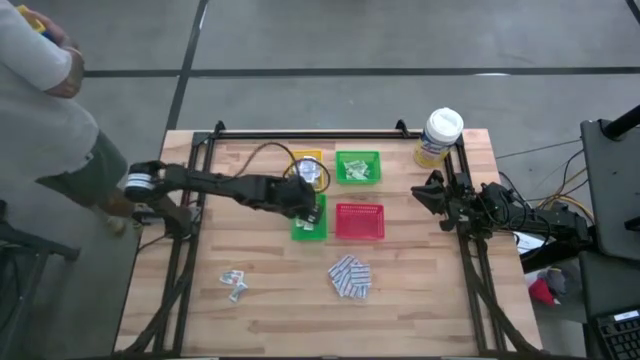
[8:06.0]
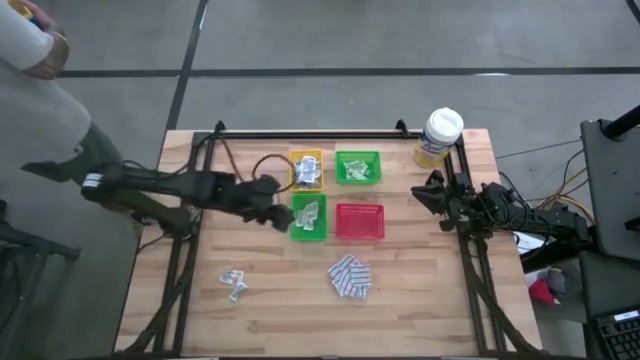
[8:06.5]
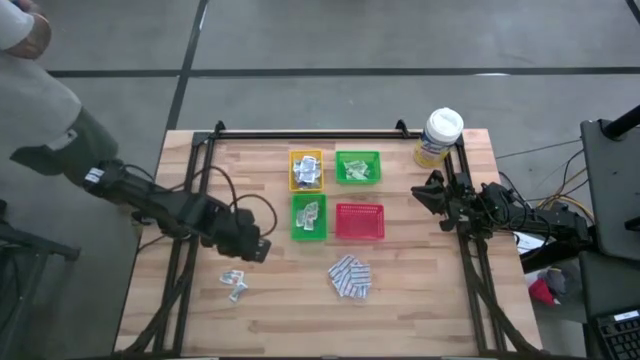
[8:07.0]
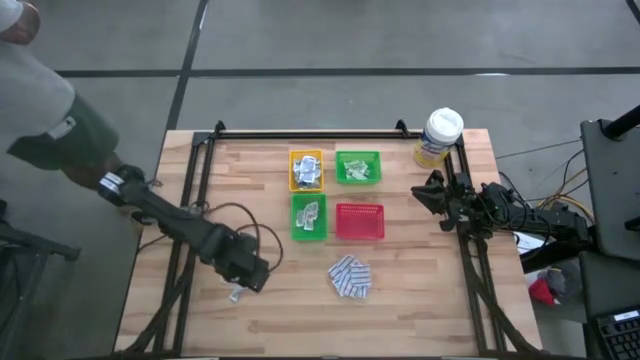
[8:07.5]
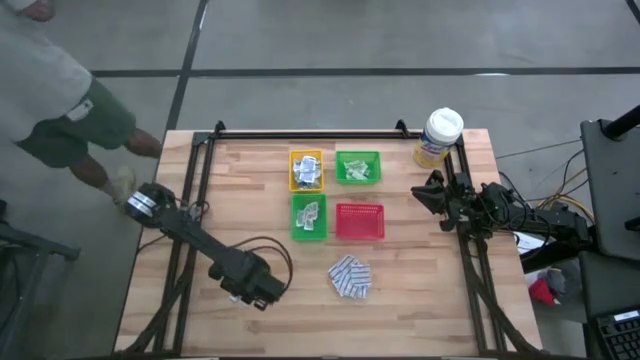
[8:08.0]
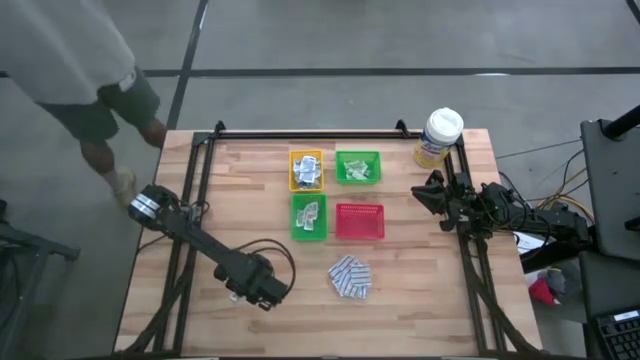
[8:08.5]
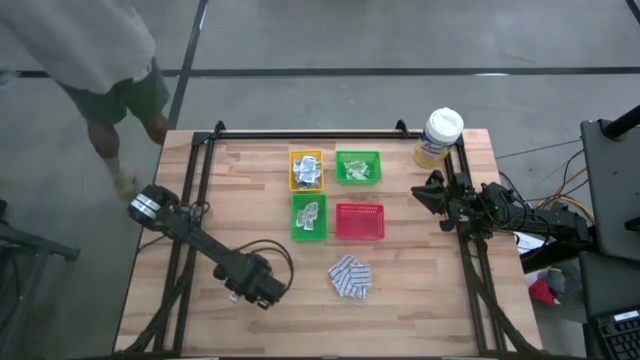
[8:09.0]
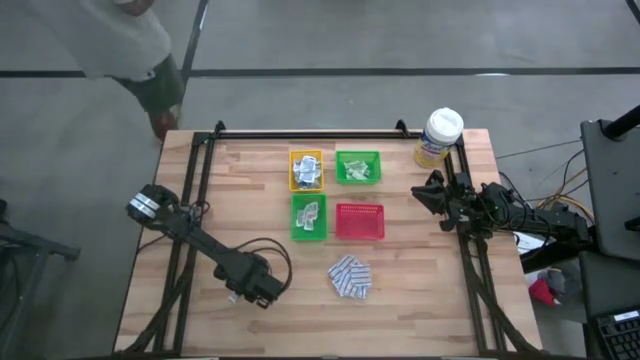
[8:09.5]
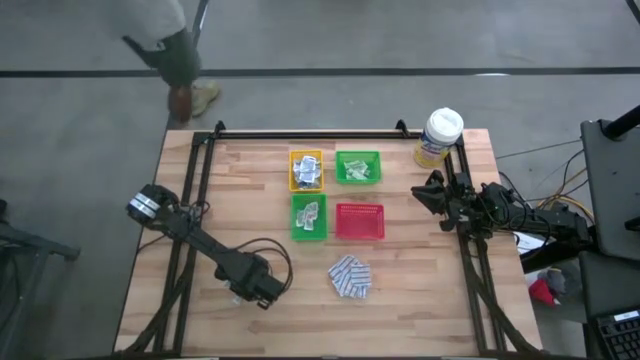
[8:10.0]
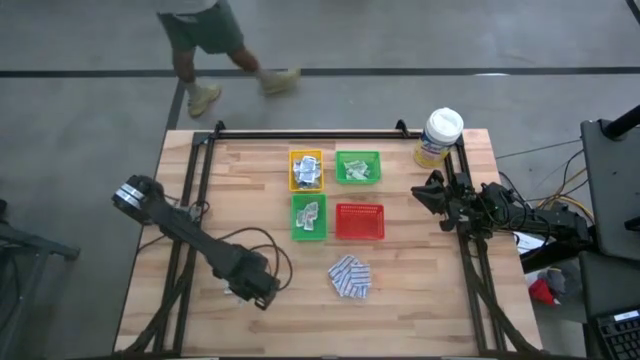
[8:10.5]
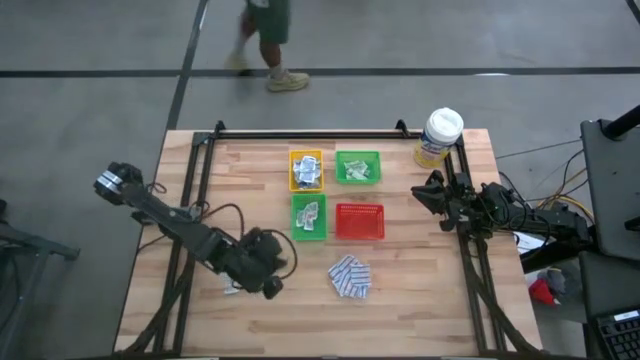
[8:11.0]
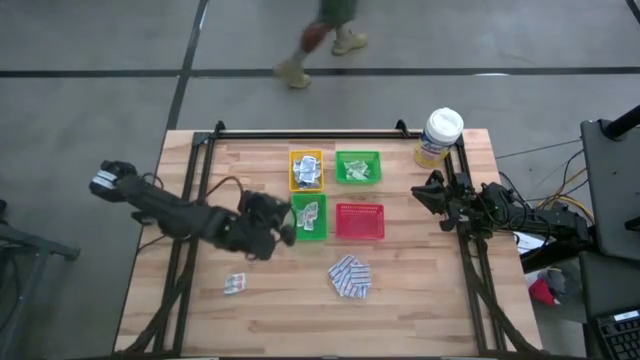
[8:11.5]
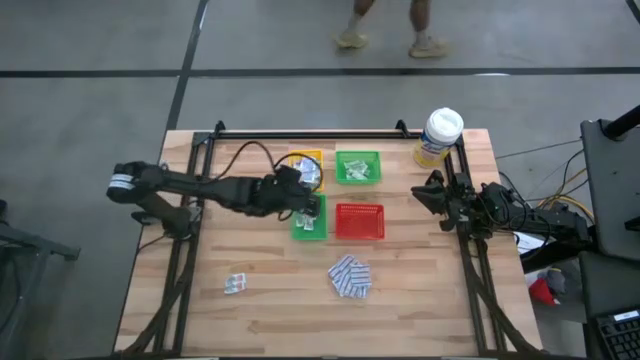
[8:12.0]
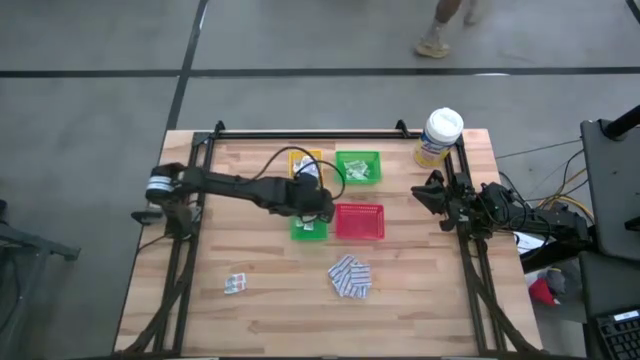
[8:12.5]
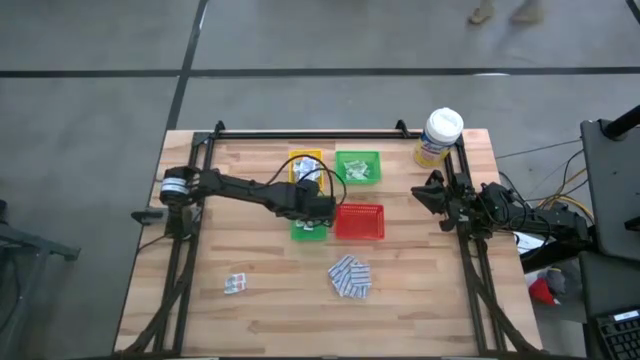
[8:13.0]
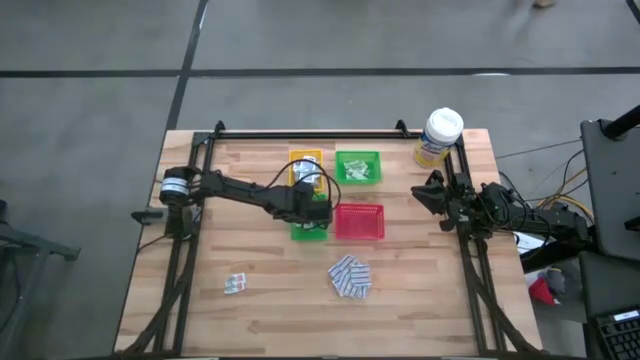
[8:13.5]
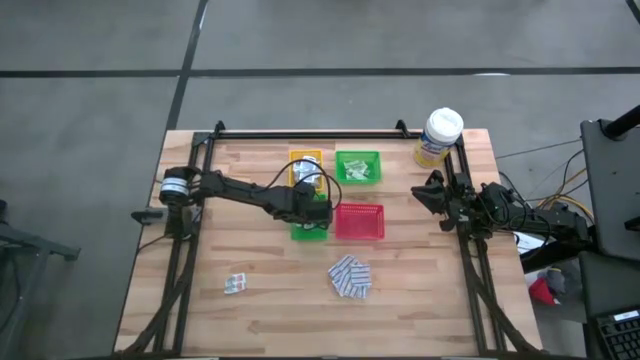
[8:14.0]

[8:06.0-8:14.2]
Task: Pick & Place First Aid Supplies
Put the orange ointment pack into the bottom green bin

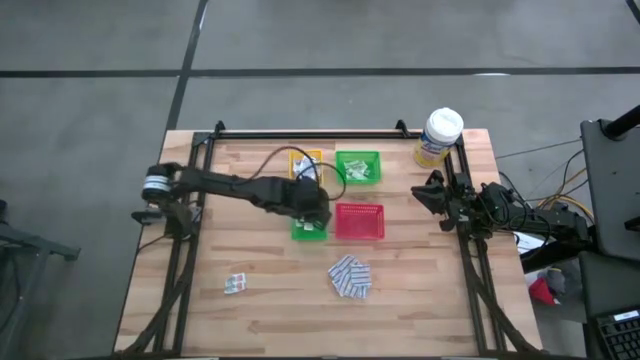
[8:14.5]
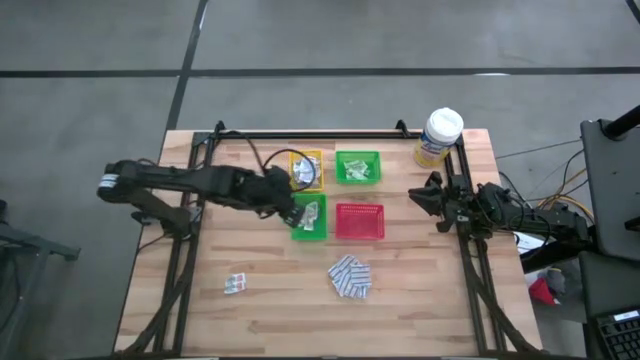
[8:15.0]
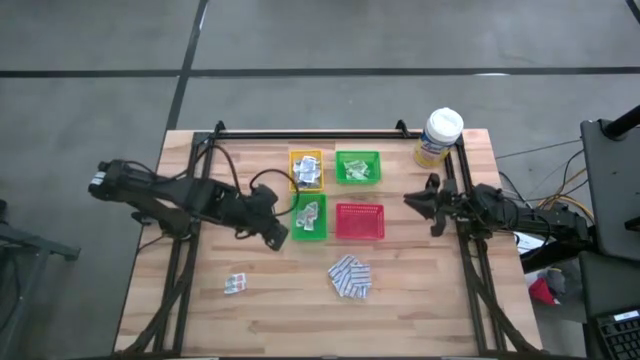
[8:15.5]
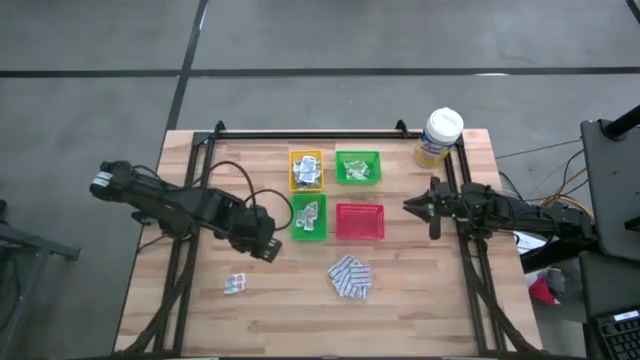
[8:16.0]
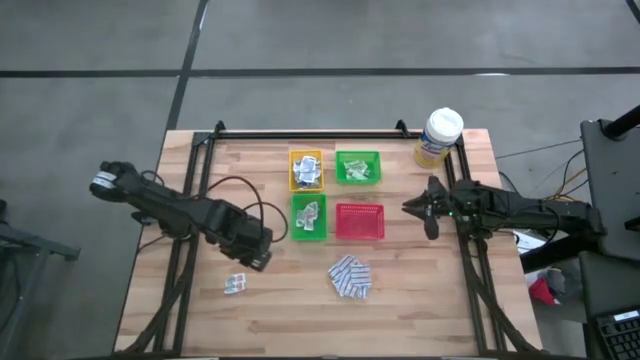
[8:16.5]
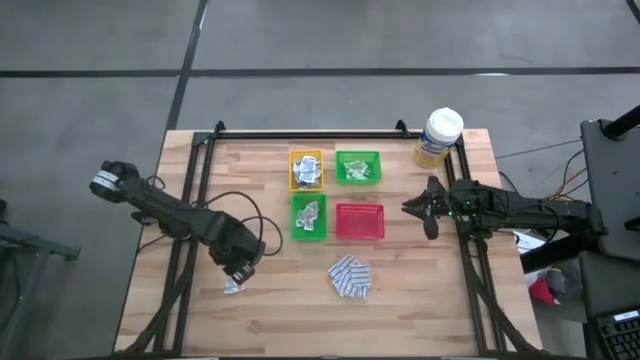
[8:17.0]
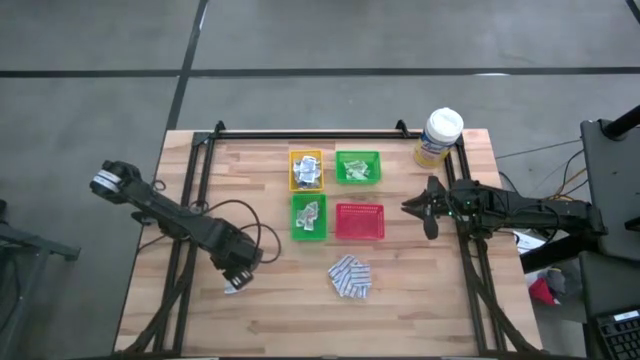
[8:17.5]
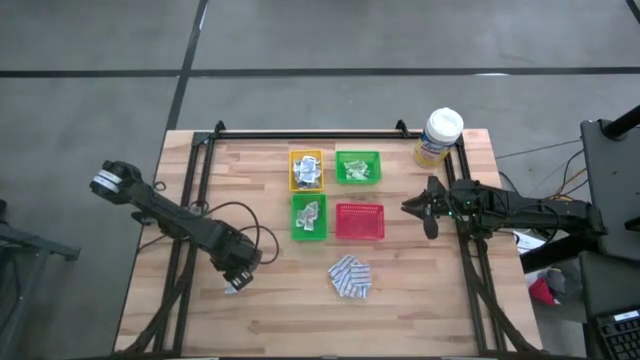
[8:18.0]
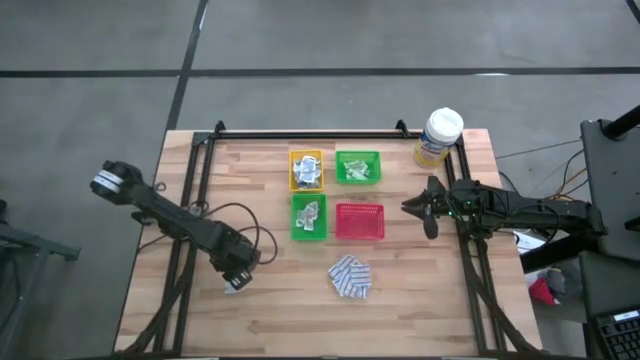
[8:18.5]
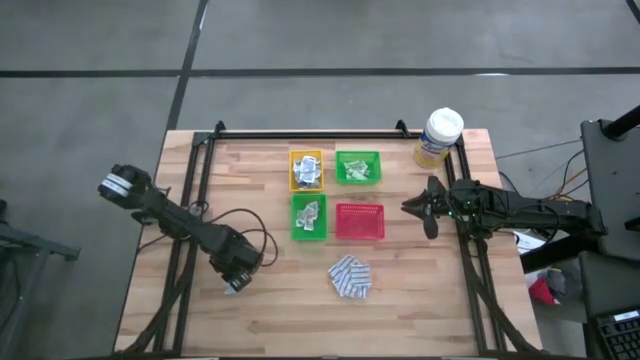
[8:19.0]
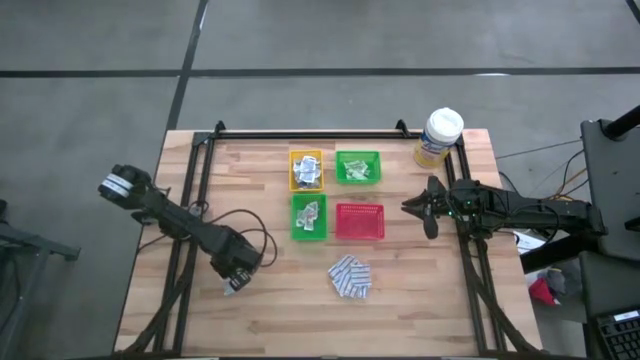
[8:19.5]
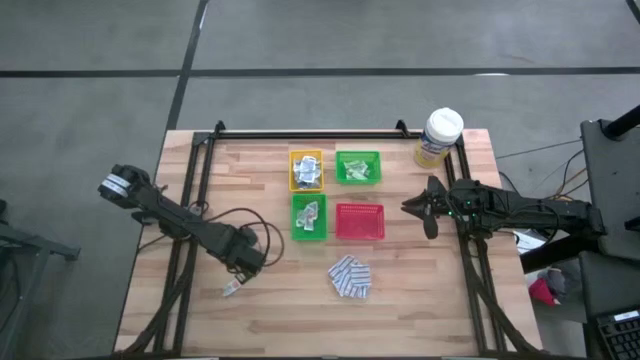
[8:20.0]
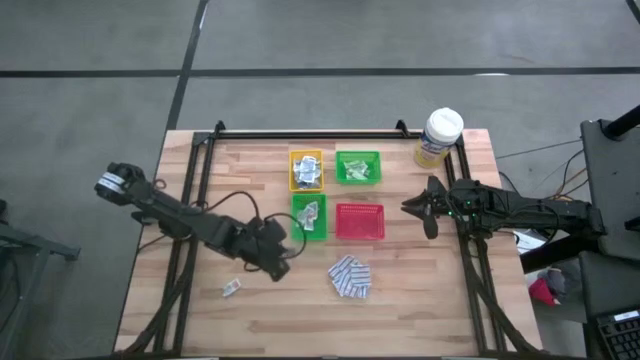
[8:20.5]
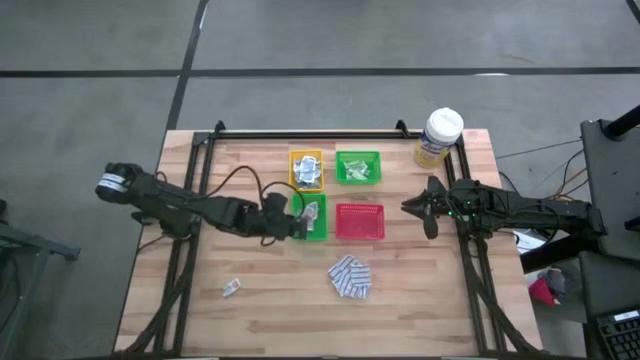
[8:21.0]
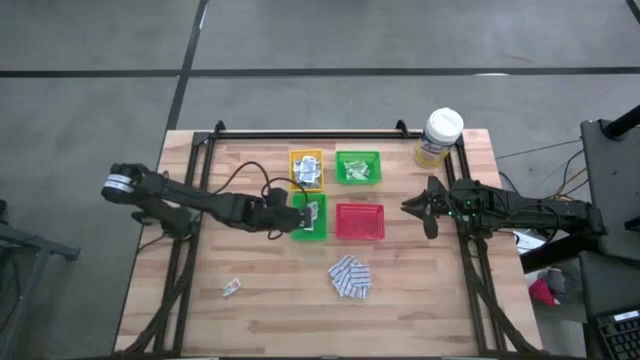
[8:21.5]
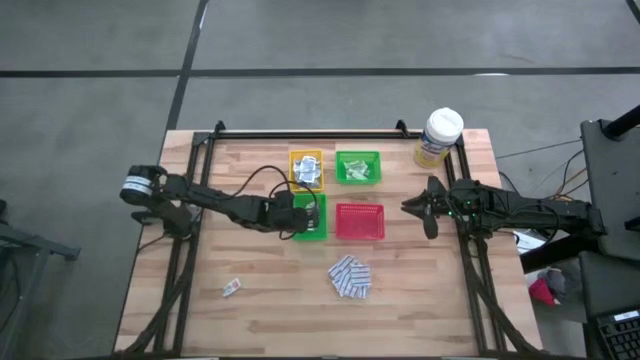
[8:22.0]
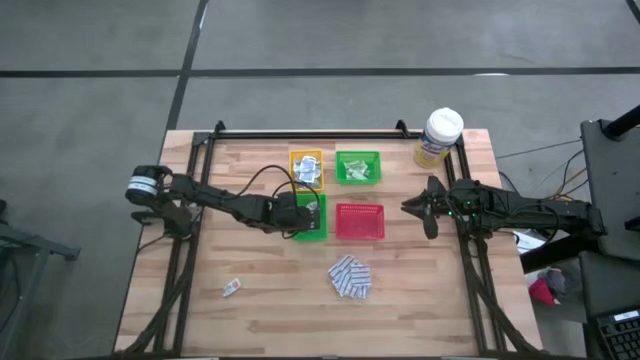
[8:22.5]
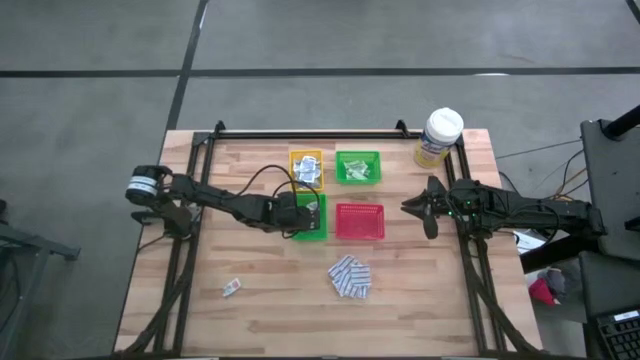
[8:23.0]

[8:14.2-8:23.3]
Put the orange ointment pack into the bottom green bin

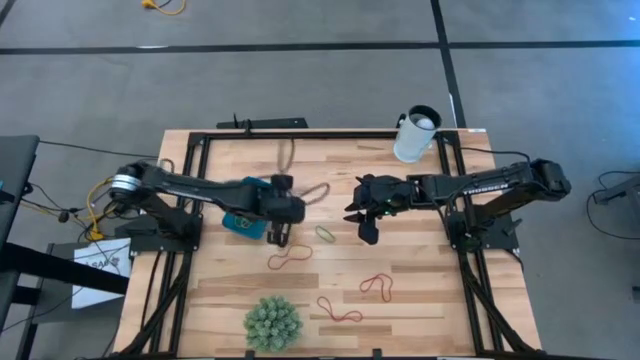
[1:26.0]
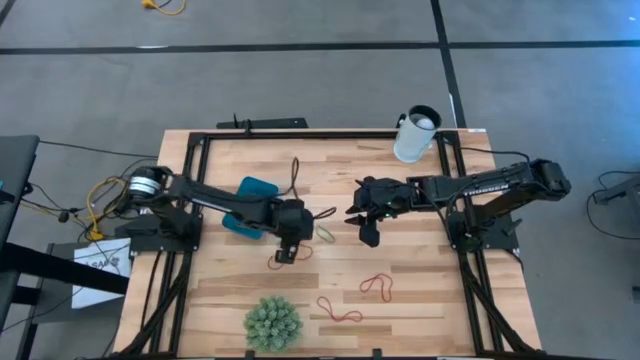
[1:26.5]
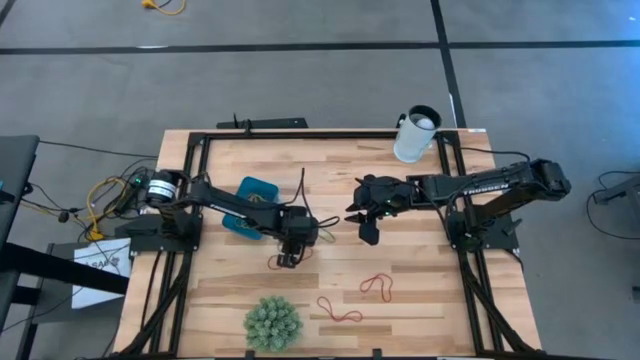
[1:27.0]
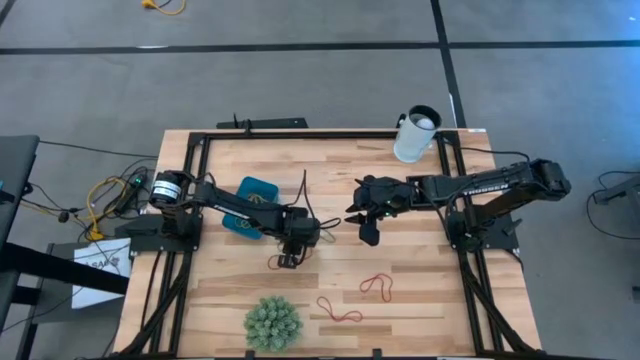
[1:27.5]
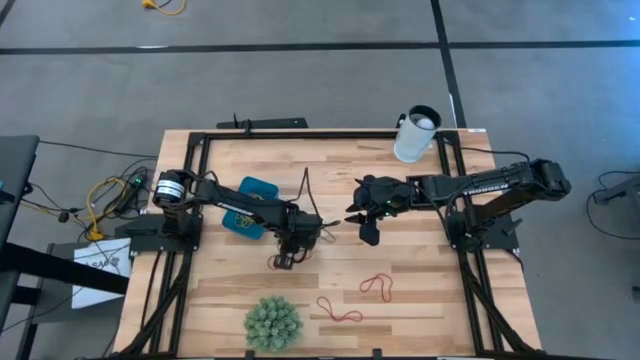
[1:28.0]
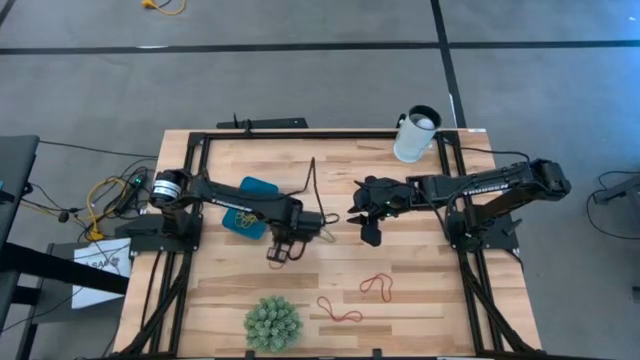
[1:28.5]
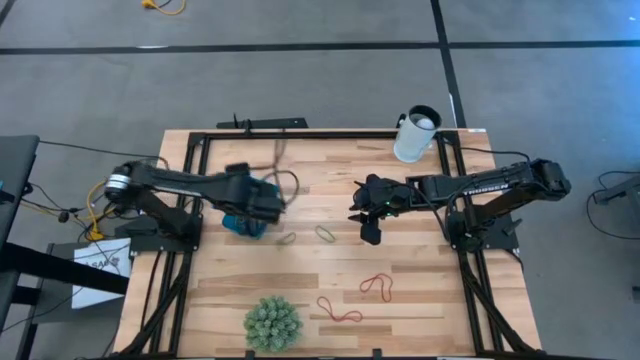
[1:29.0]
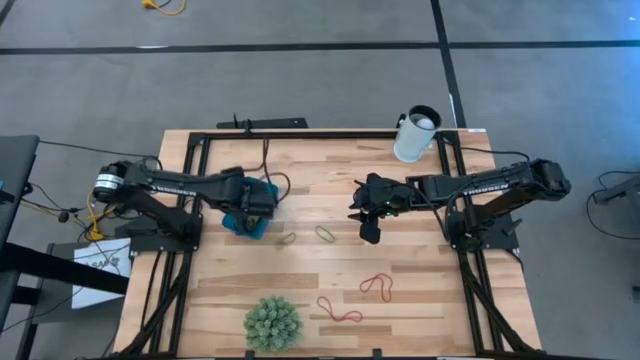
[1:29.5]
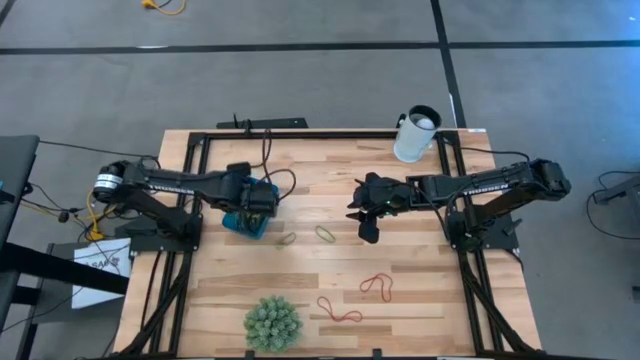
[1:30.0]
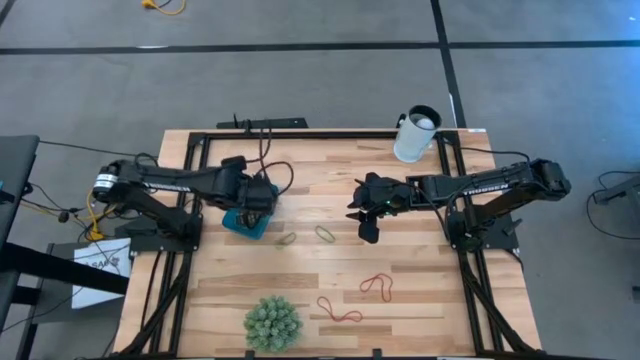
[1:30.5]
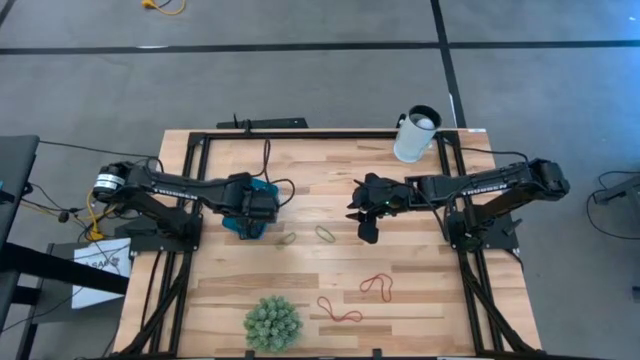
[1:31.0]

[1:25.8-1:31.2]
Task: Pick and place items into bin
Put the red rubber band into the blue bin
